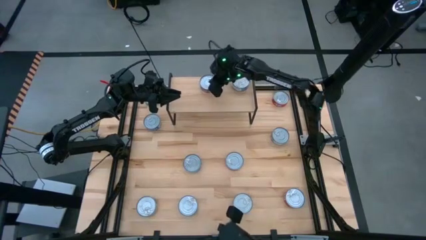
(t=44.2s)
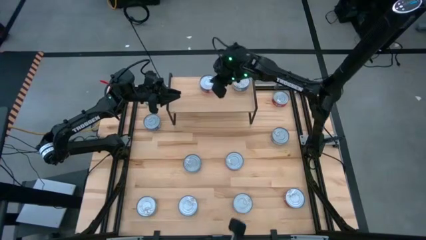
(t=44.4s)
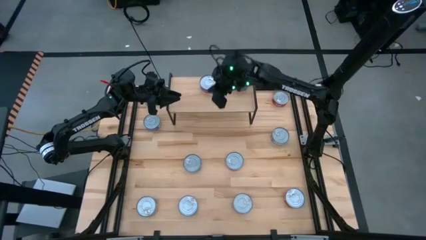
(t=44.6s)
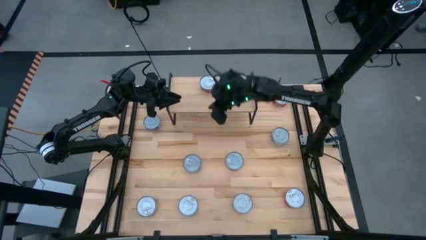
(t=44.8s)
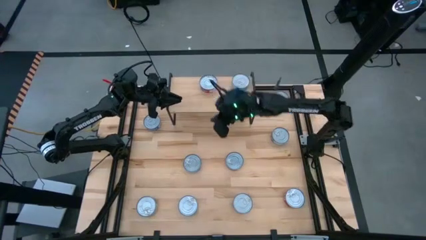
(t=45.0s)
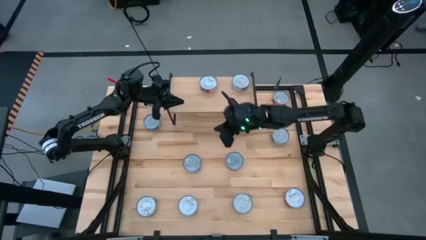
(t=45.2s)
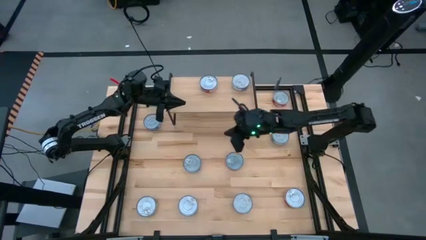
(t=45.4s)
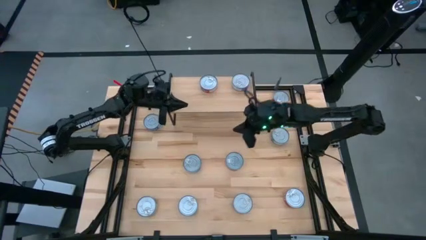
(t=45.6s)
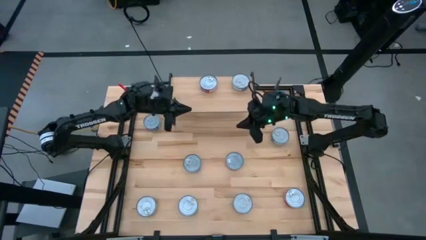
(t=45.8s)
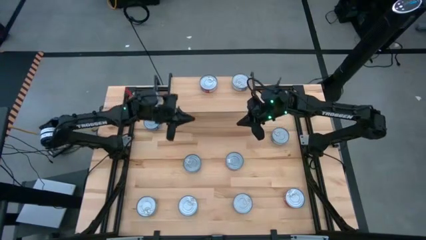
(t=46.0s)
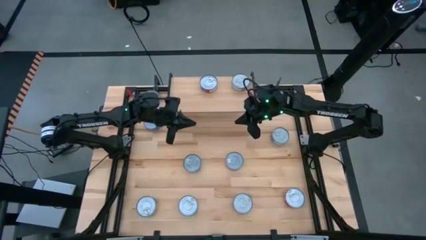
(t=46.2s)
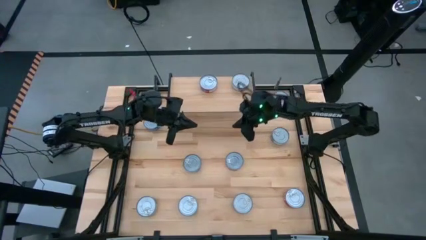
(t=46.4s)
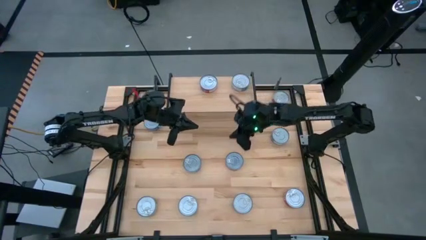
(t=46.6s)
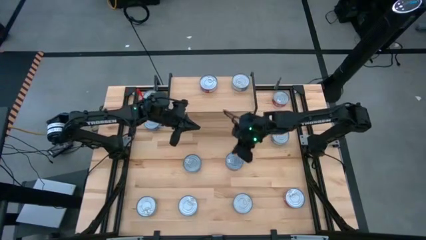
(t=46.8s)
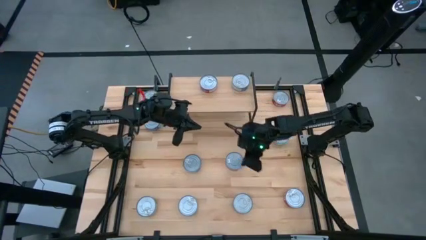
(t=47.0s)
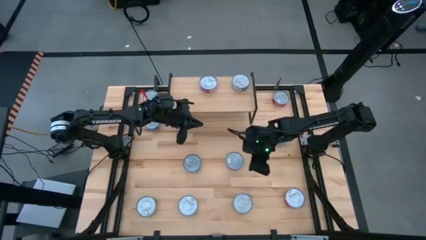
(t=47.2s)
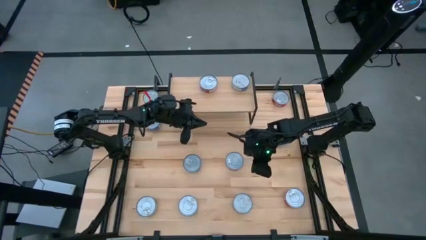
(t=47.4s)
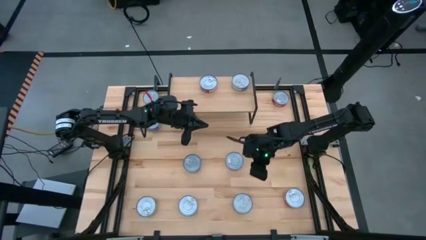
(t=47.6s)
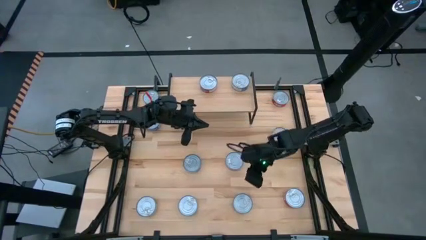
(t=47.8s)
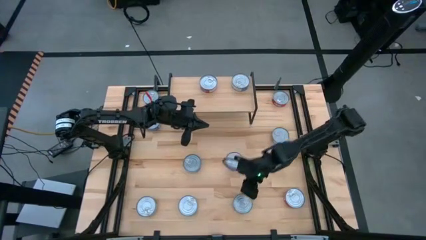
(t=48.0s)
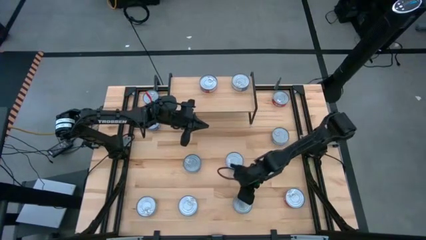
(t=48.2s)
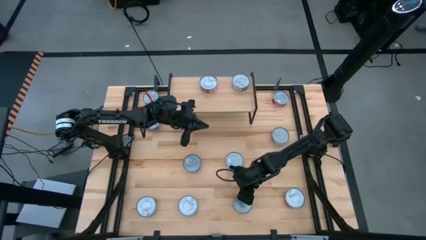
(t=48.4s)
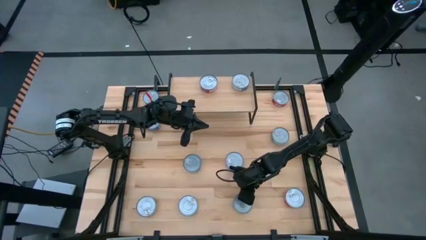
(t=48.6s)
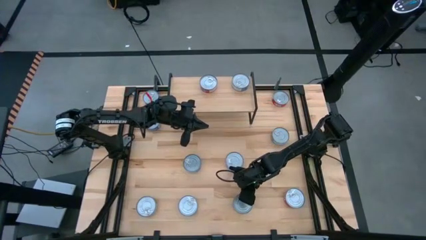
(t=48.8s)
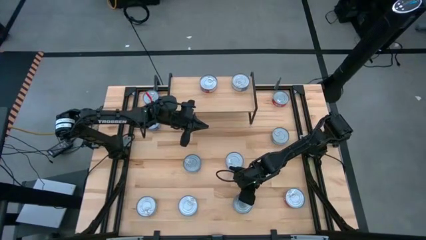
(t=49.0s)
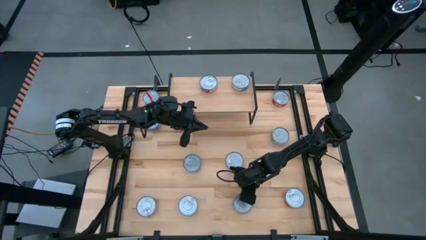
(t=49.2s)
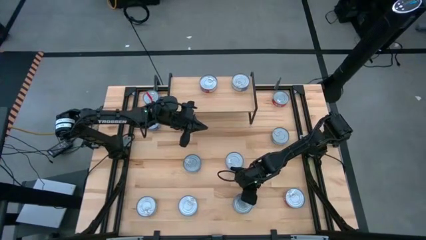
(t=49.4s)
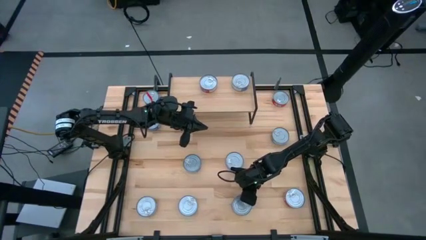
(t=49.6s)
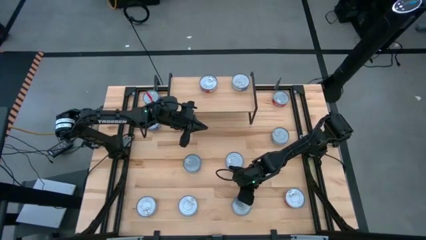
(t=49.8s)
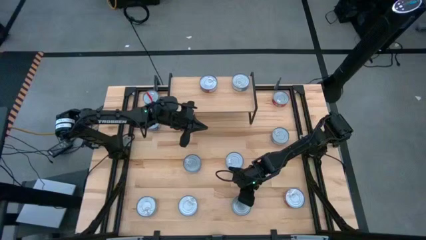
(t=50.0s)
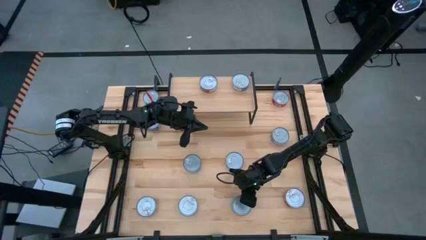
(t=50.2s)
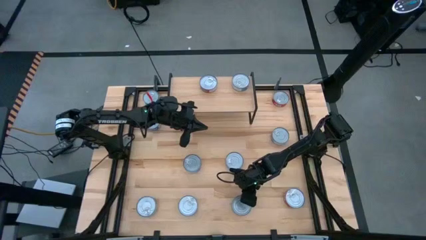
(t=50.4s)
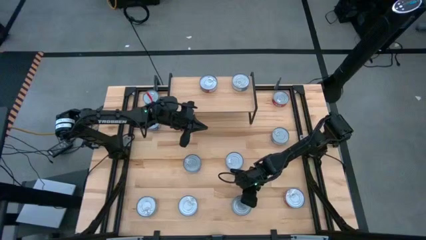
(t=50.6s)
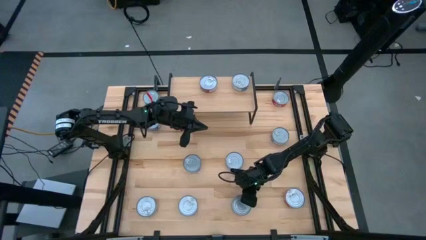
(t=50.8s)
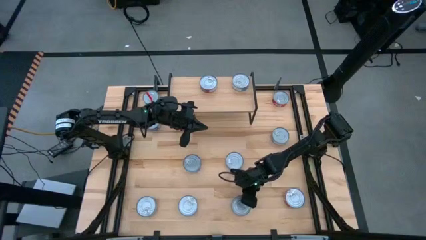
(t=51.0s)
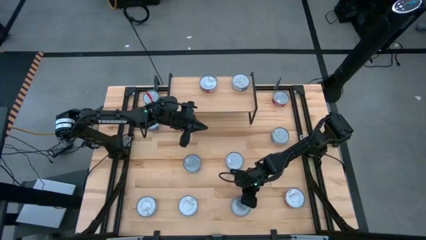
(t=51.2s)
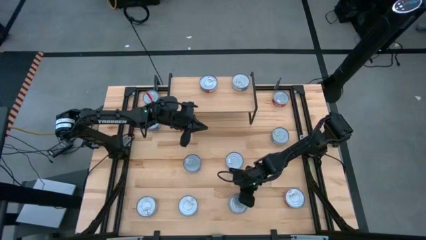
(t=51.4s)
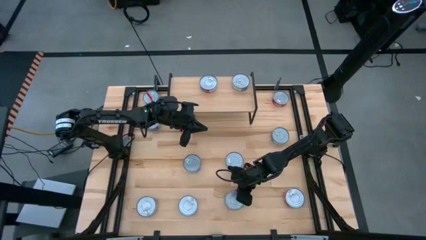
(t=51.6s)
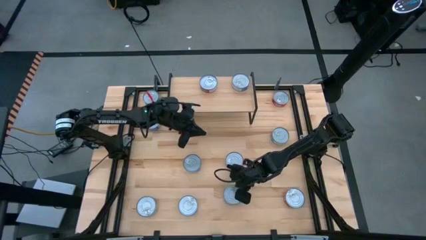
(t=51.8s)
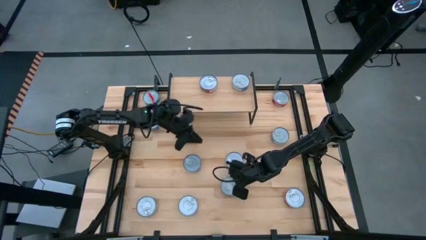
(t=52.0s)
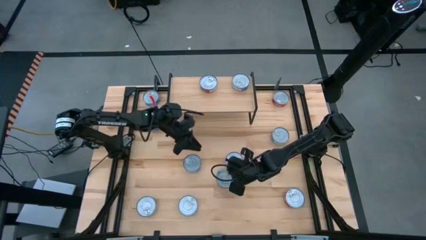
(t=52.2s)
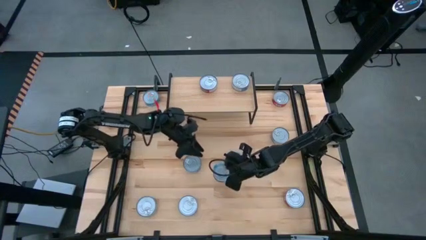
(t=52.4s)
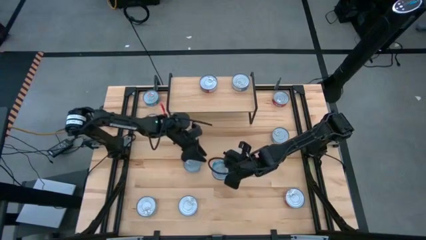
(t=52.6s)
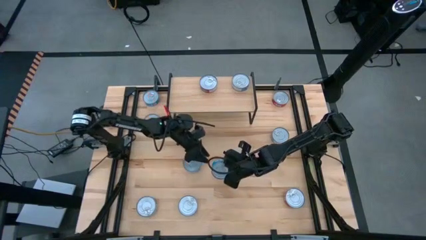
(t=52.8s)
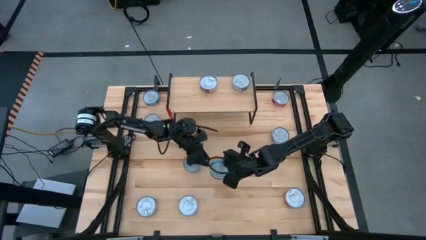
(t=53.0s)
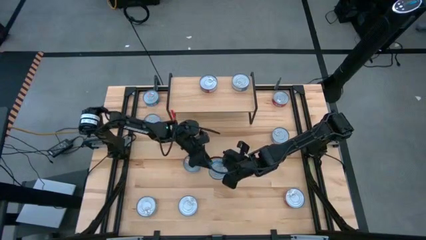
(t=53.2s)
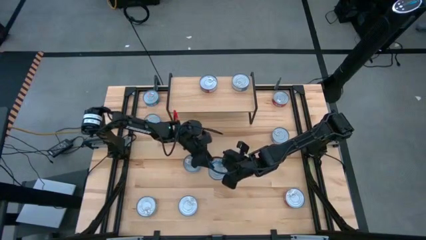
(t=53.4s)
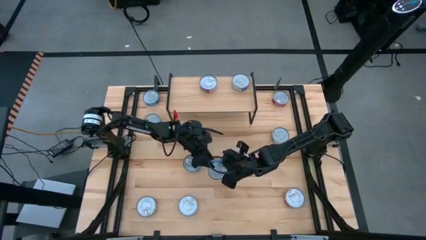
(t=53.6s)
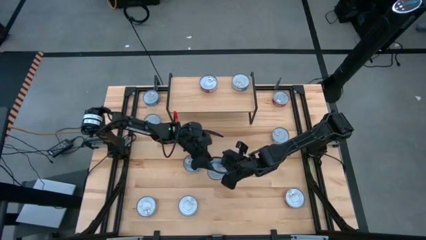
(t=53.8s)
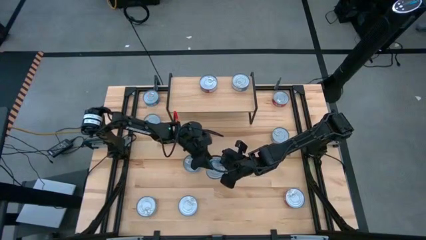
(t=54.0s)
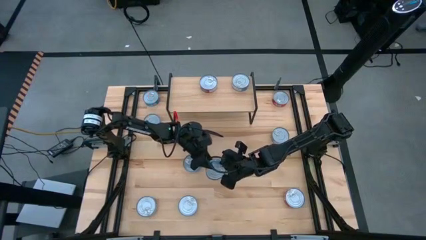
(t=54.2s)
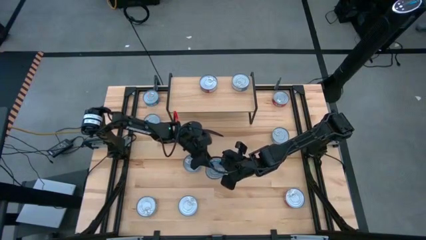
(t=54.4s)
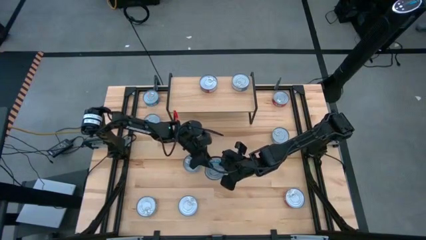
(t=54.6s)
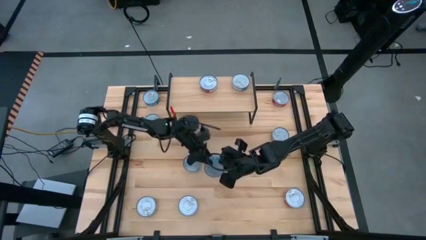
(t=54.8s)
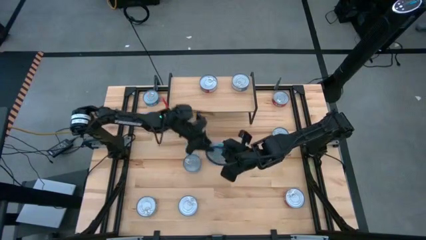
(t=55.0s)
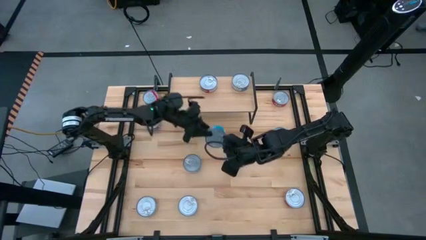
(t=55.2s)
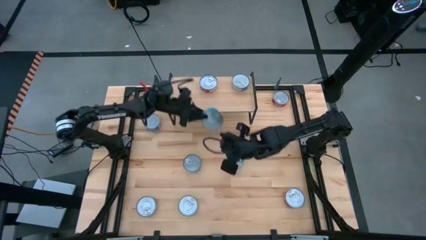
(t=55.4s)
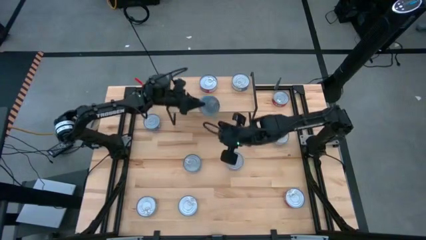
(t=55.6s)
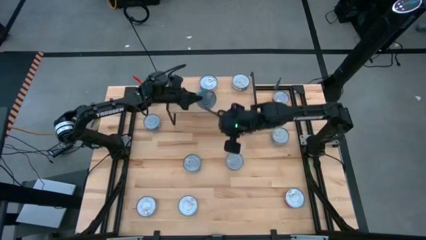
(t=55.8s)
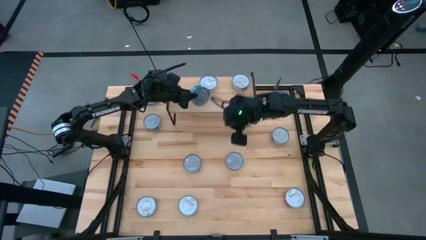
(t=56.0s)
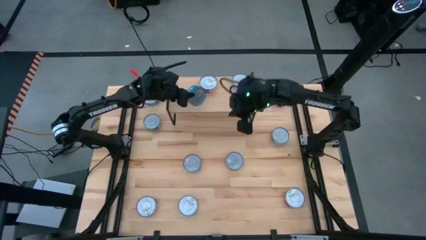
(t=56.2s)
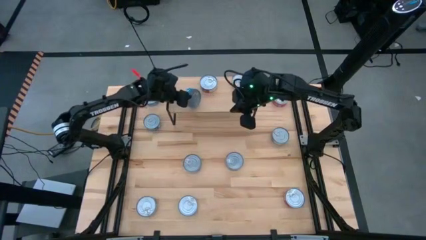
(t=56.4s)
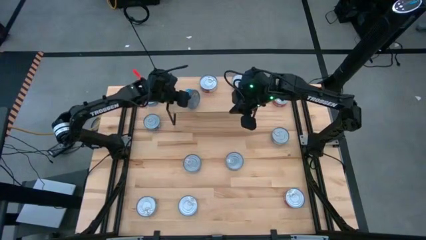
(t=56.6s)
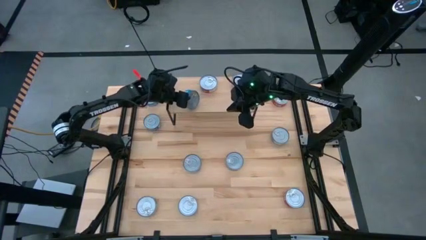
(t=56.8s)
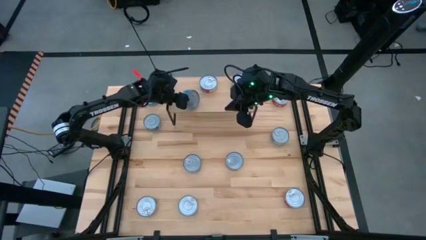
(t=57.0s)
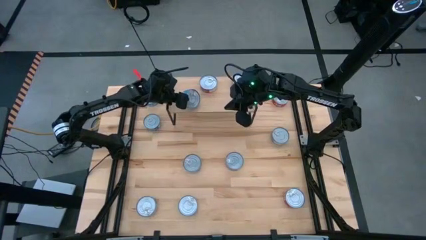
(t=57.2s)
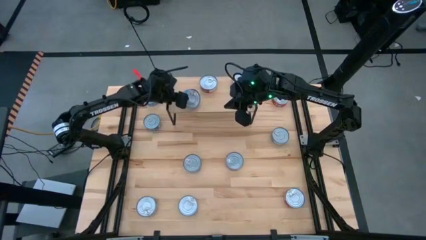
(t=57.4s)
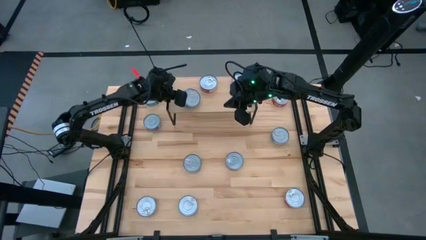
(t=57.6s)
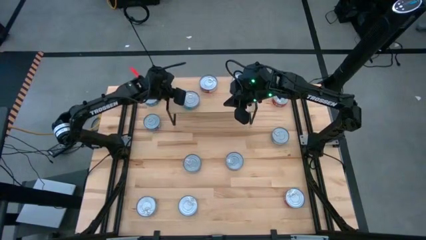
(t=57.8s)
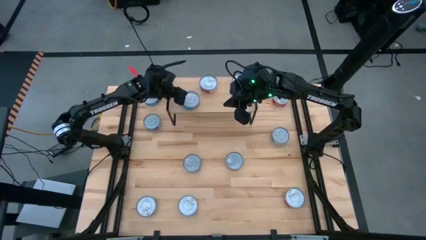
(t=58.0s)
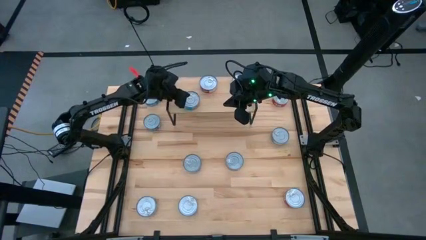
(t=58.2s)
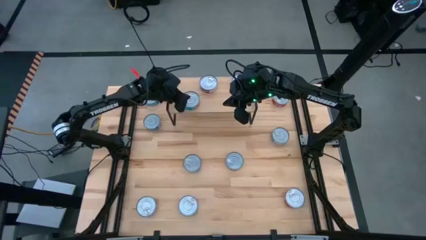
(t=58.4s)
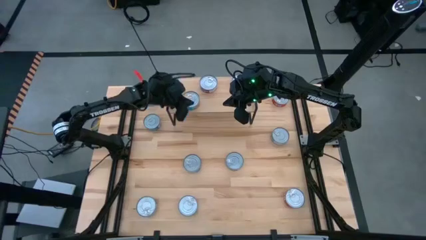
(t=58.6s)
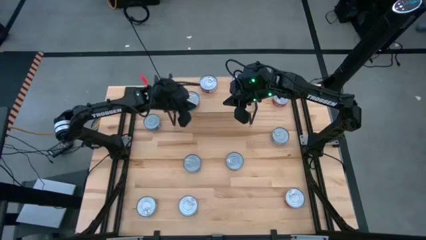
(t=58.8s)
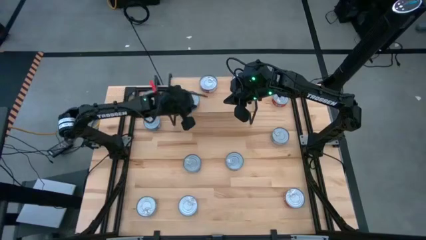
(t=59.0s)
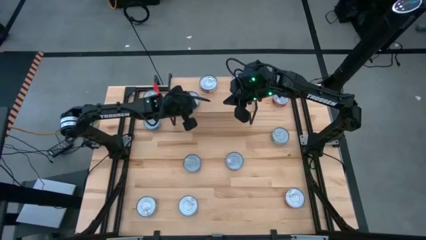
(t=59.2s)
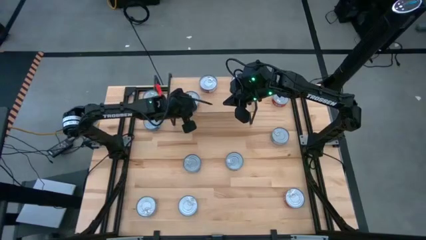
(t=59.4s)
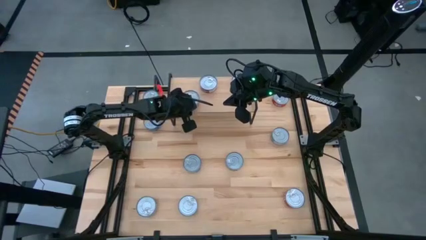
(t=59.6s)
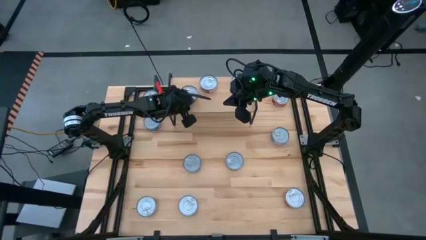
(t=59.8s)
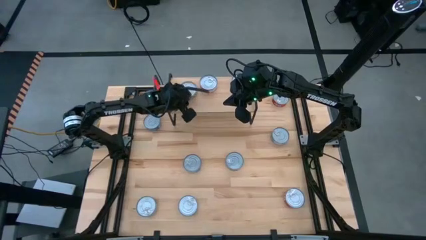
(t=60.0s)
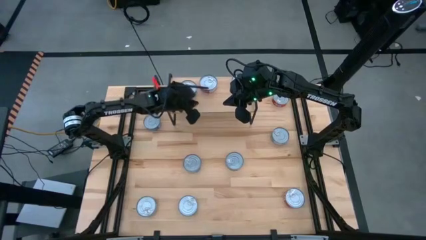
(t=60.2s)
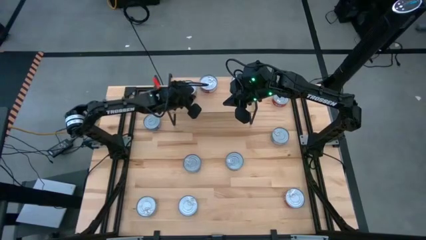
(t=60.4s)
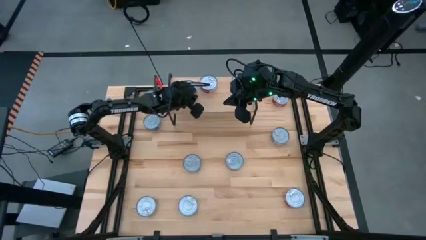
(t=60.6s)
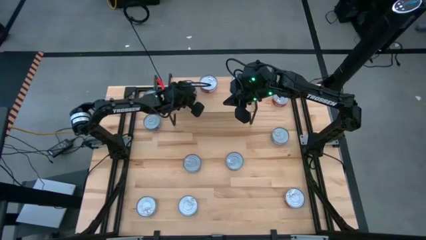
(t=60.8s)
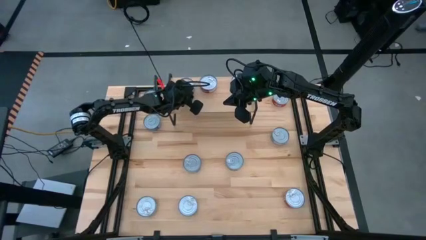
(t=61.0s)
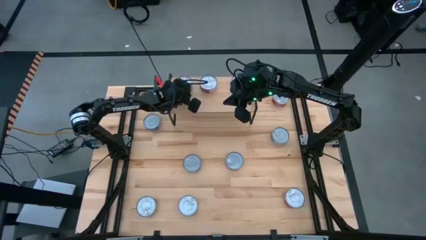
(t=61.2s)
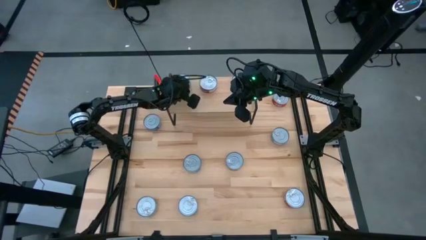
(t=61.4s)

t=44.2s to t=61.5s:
Task: Stack canned seafood by type on shelf
Put the bottom right yellow and blue tuna can on the shelf

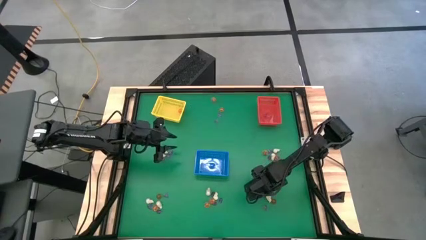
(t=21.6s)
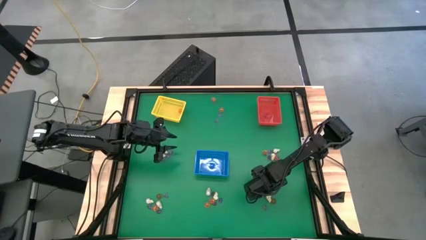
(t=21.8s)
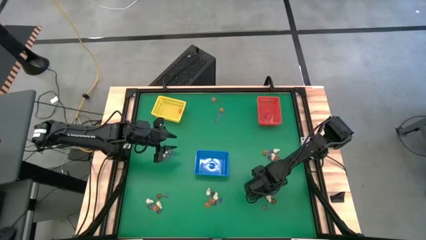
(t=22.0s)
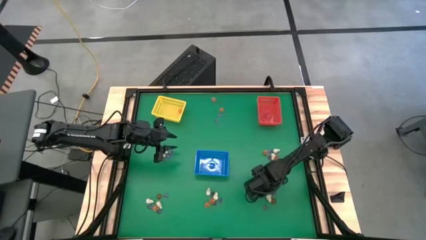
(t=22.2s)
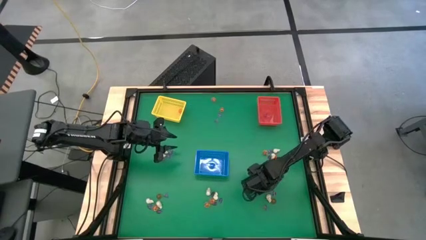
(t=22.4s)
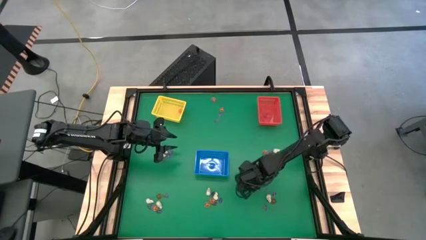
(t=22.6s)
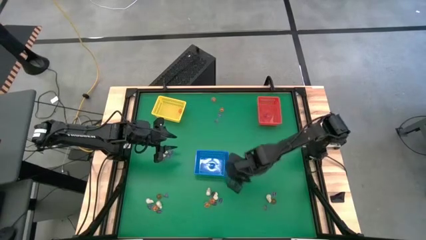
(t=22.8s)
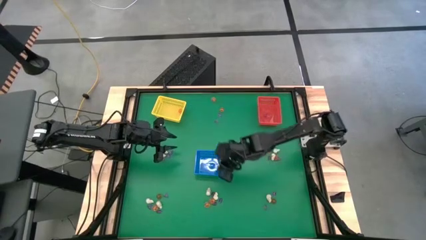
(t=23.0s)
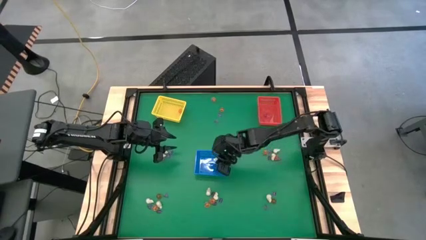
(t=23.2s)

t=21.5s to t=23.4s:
Task: Sort Halloween decoration
Put the white skull toy into the blue bin
